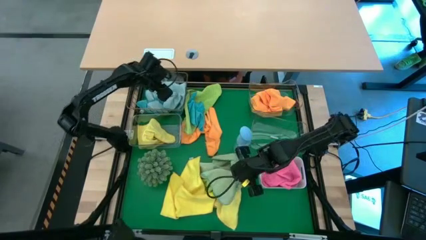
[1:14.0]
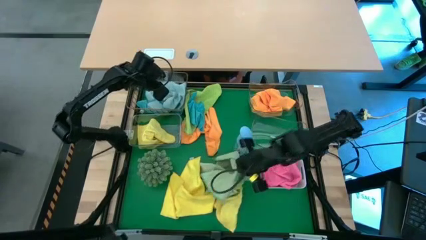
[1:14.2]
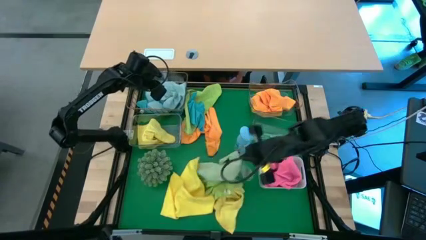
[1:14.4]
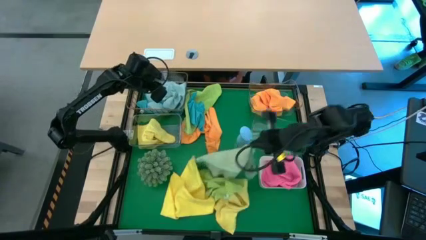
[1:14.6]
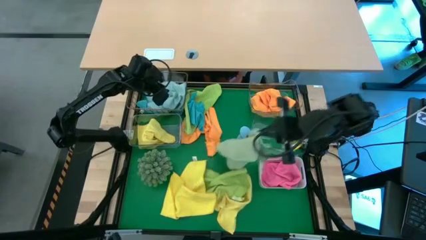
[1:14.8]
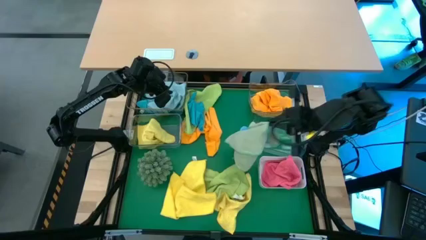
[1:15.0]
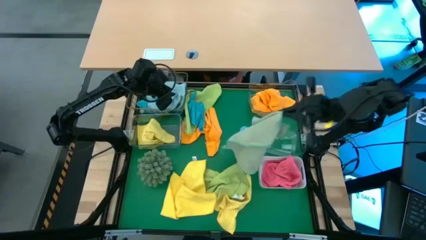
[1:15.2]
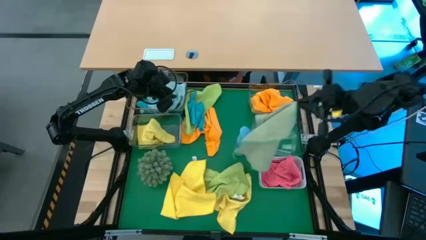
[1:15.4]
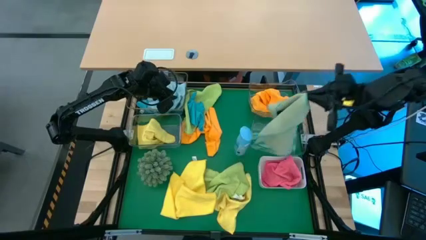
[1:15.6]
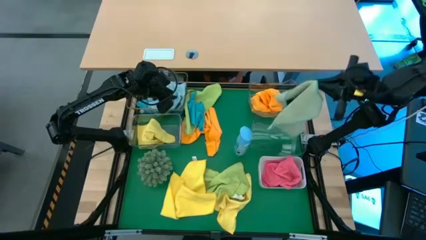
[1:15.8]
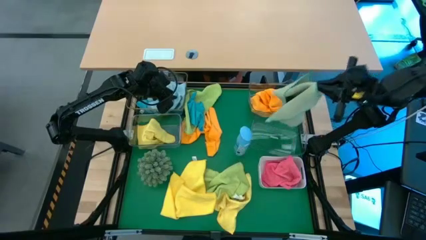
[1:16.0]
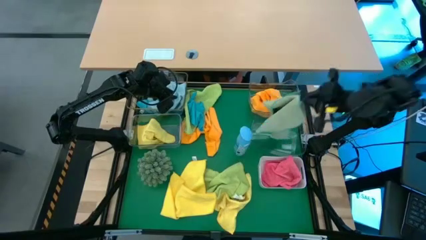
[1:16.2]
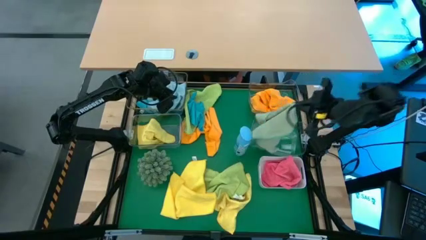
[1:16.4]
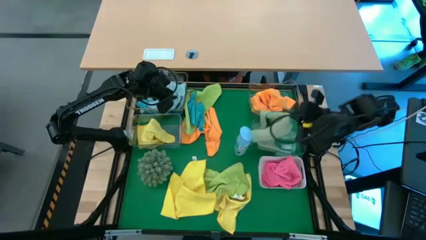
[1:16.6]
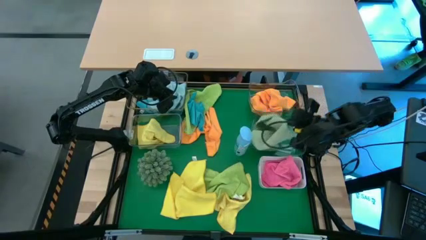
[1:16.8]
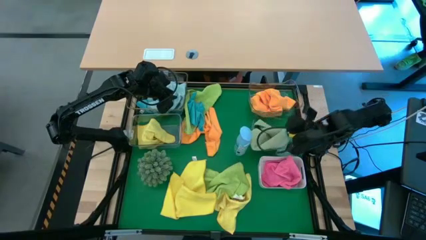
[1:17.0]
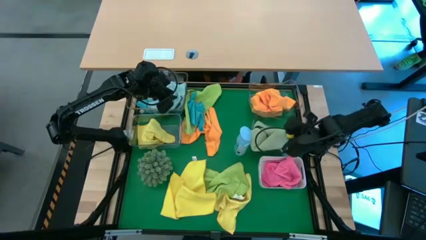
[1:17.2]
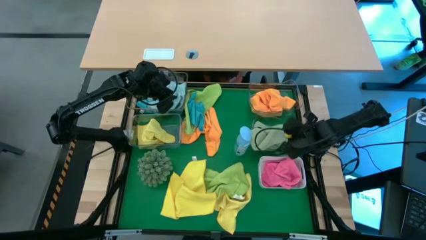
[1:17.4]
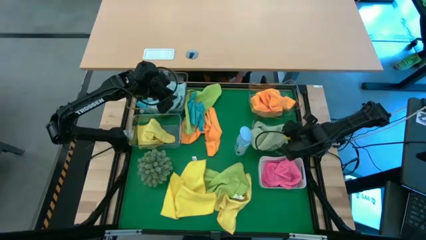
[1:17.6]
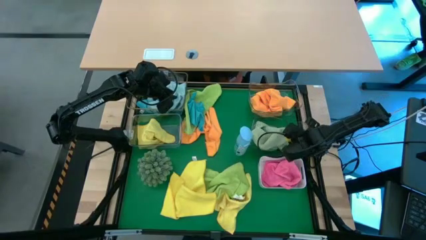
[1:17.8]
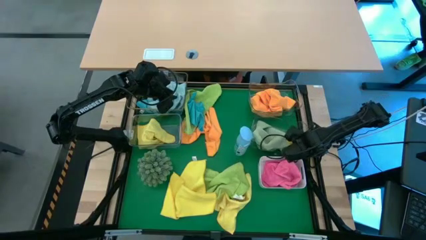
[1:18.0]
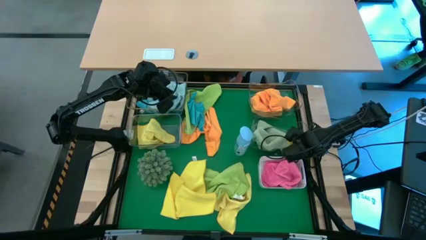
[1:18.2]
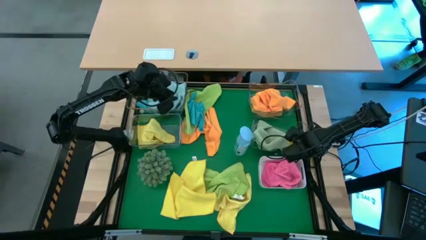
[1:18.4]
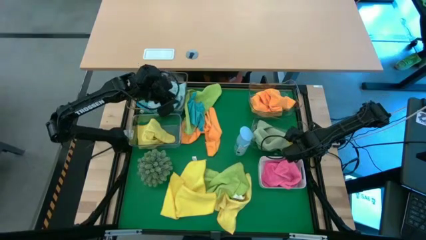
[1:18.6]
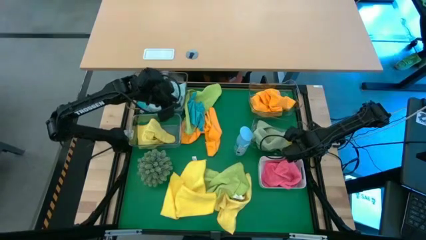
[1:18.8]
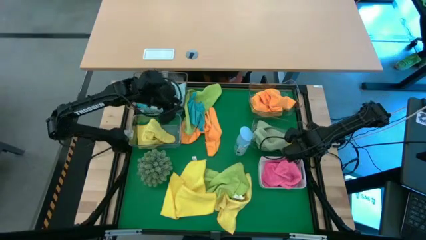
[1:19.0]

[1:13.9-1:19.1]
Task: Sort microfiber towel by color & place in baskets
Put the green microfiber towel into the bottom right transparent bin

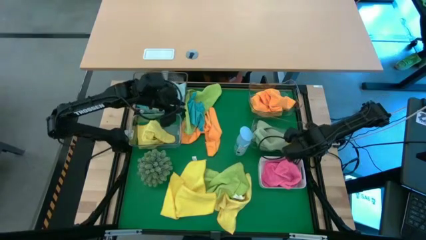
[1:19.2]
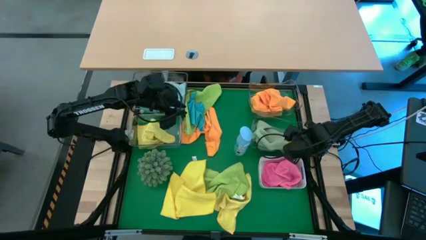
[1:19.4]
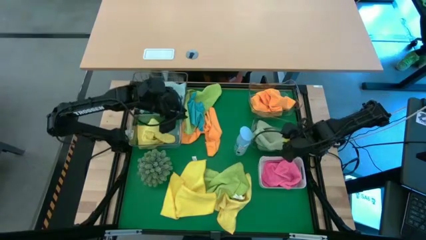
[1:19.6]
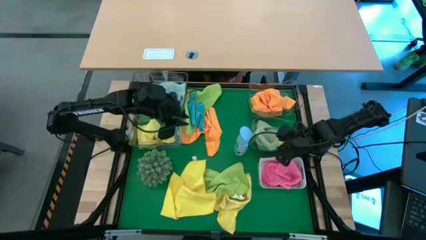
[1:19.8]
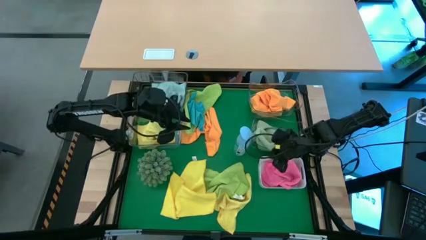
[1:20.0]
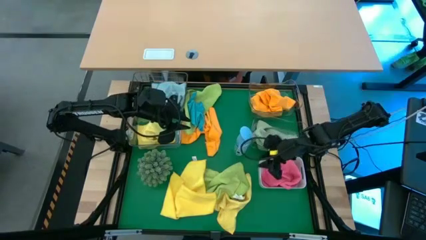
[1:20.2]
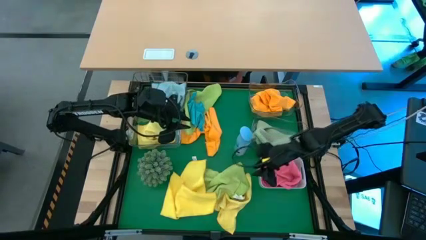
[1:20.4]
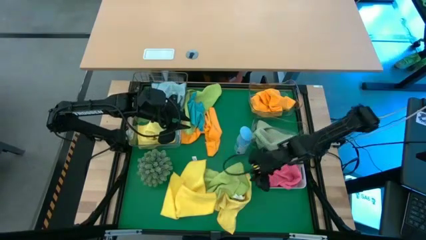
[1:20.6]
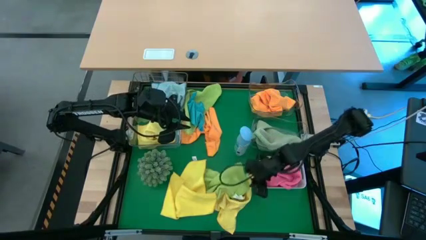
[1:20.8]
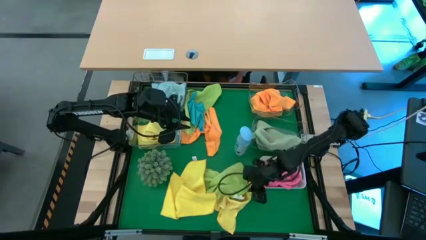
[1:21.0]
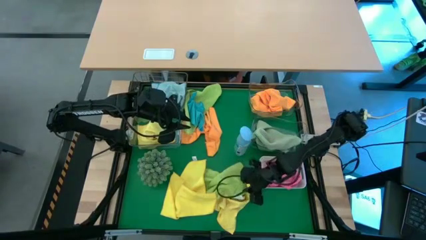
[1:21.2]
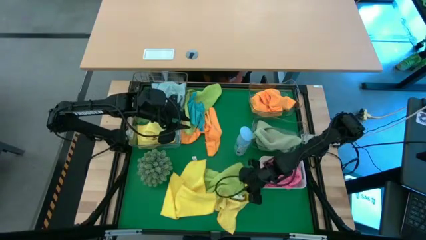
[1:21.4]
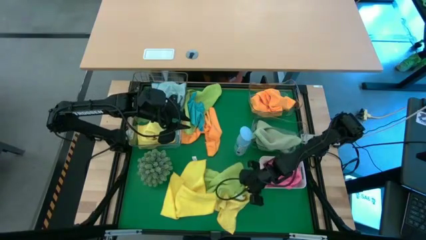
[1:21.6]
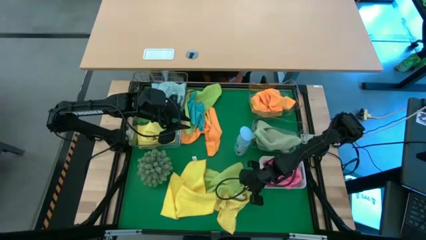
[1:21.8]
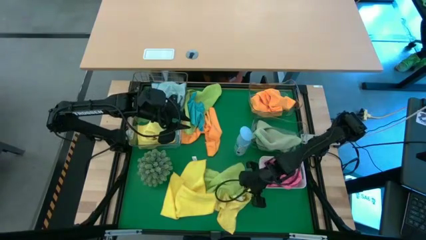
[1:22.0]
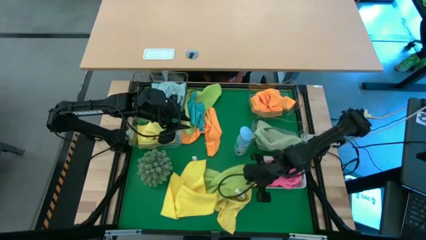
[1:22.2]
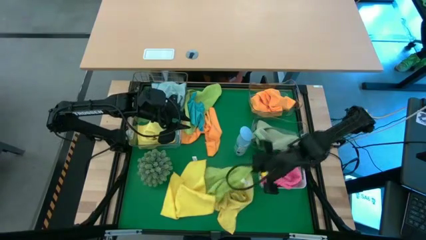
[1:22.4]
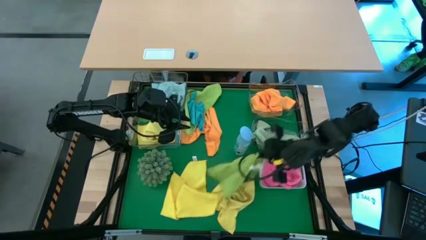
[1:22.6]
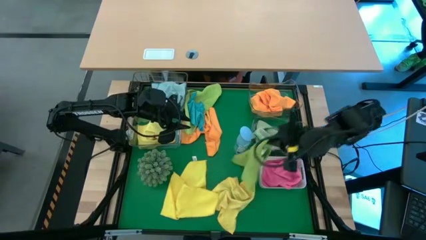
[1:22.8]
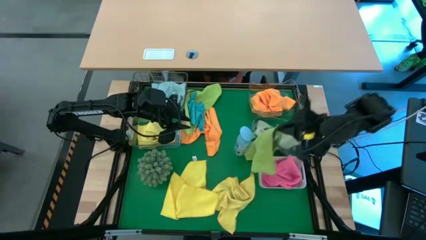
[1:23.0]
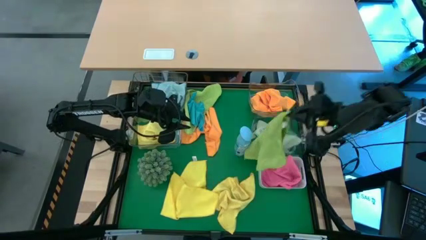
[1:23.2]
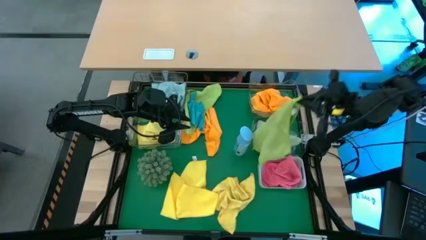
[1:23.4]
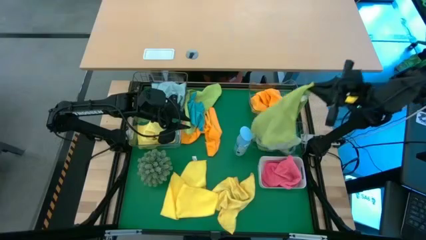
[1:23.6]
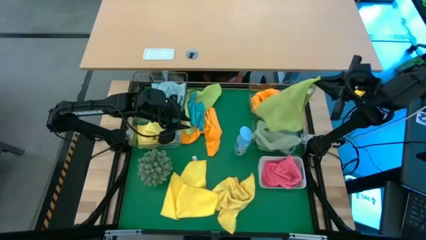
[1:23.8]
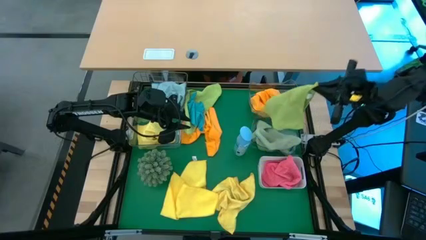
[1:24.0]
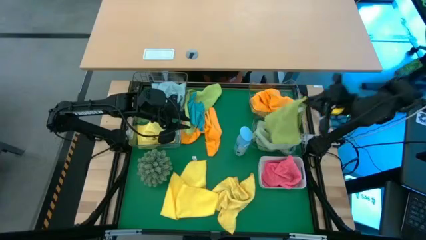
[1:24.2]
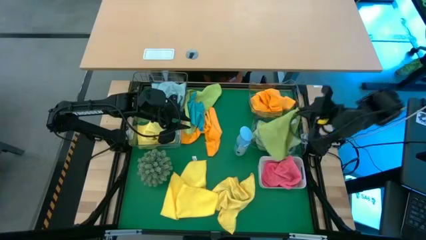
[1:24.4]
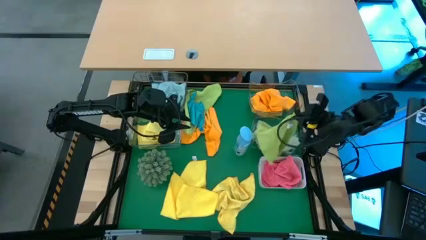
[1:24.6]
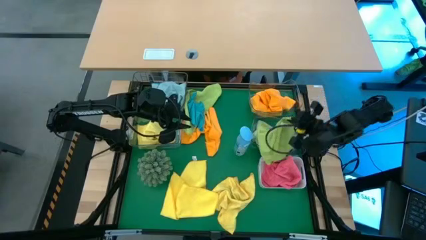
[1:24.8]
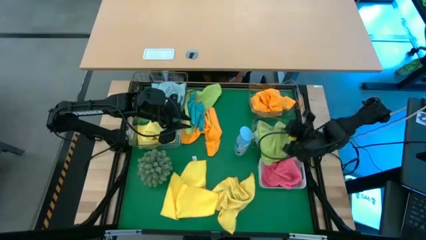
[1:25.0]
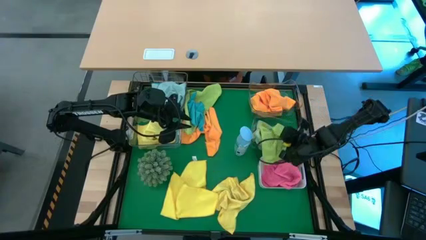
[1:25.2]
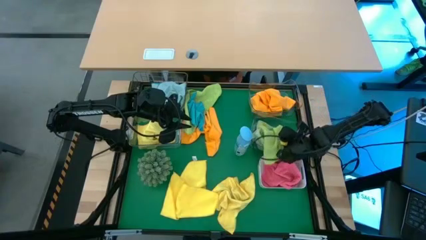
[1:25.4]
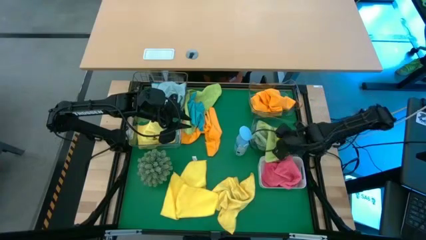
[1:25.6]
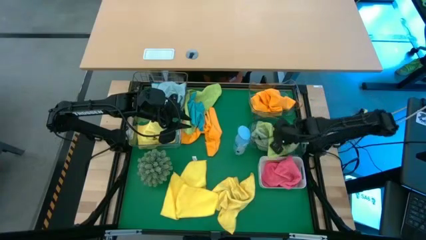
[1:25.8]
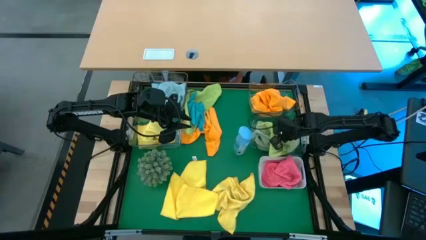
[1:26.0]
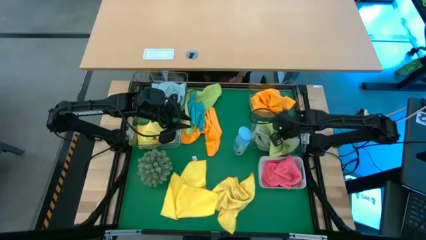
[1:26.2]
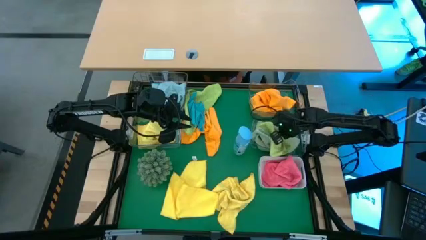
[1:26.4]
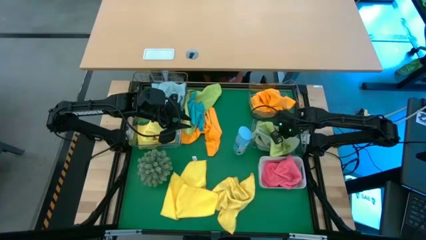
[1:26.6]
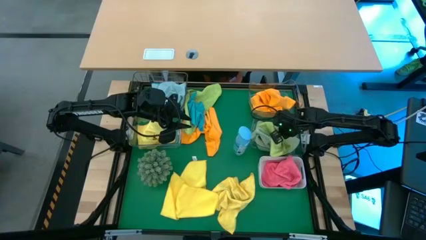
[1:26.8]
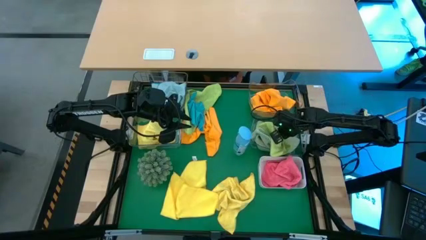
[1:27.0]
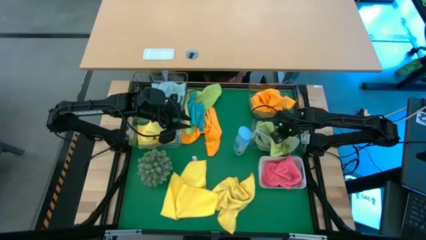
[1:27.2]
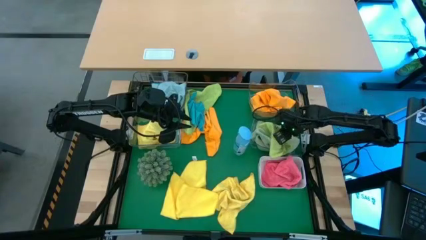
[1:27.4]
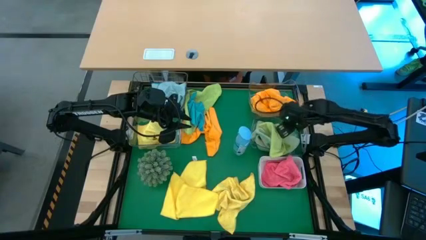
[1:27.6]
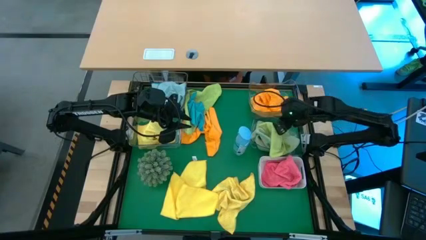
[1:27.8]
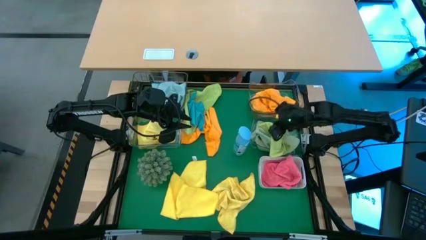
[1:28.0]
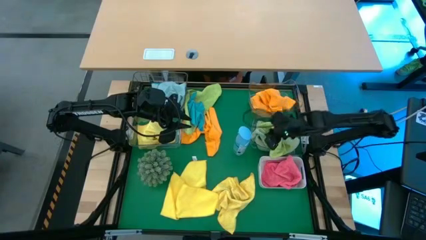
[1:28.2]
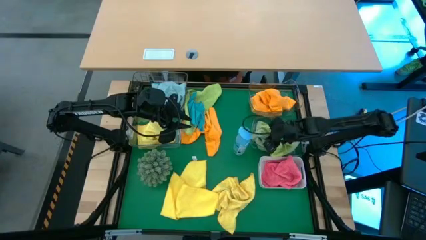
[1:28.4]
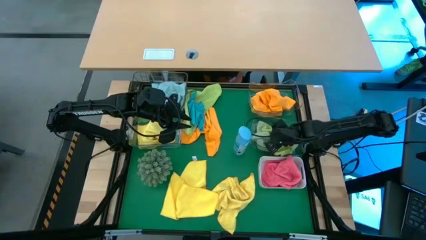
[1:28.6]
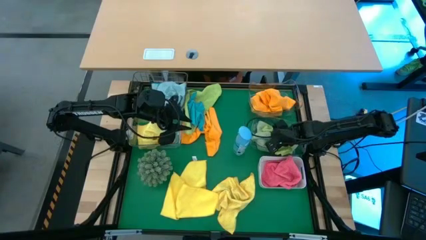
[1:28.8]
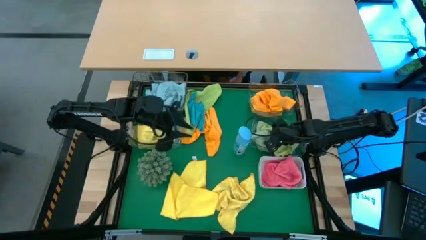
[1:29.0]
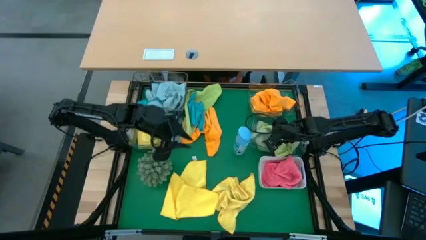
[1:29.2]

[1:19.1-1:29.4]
Put the light green microfiber towel into the bottom right transparent bin
